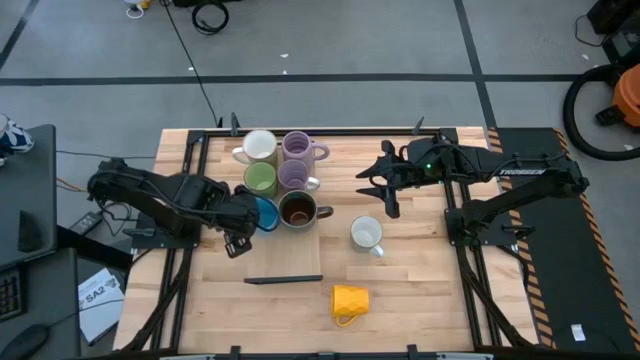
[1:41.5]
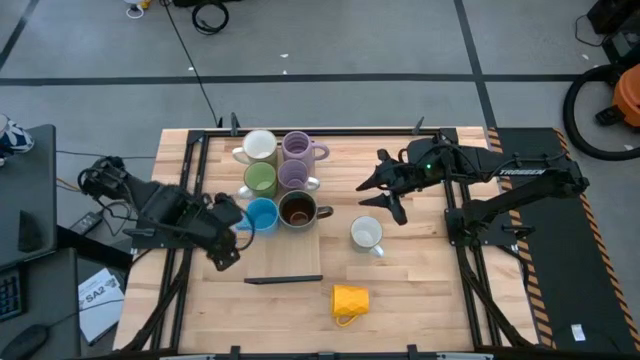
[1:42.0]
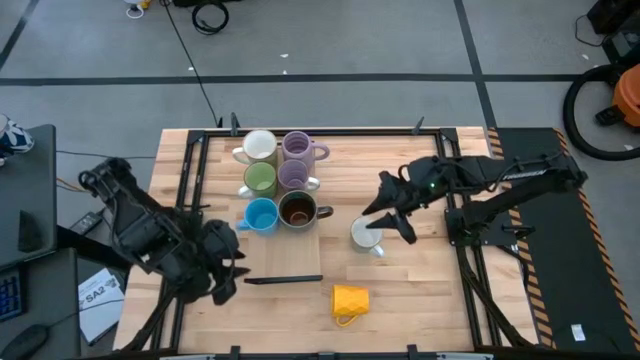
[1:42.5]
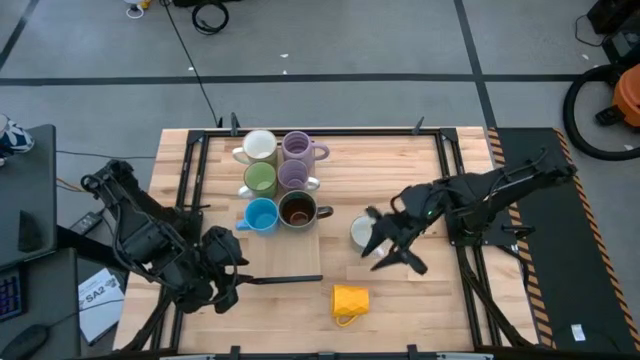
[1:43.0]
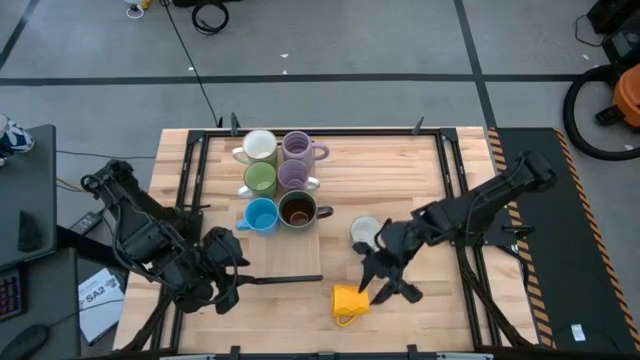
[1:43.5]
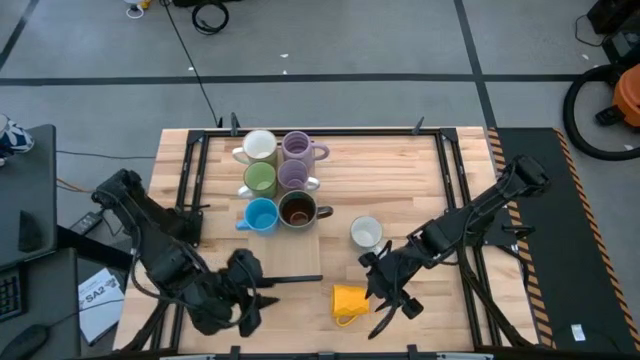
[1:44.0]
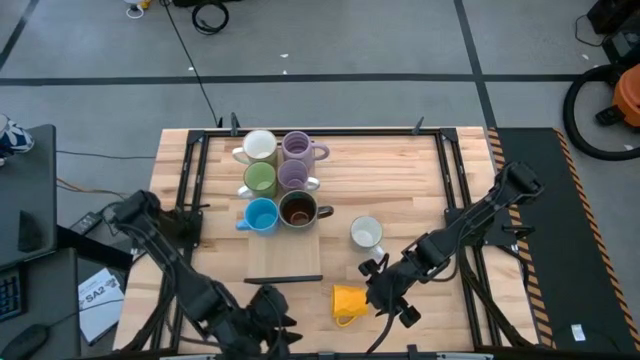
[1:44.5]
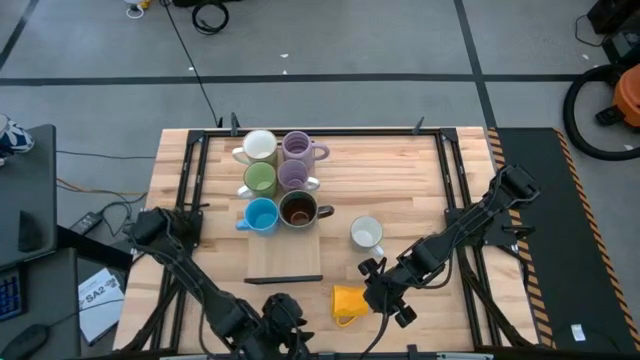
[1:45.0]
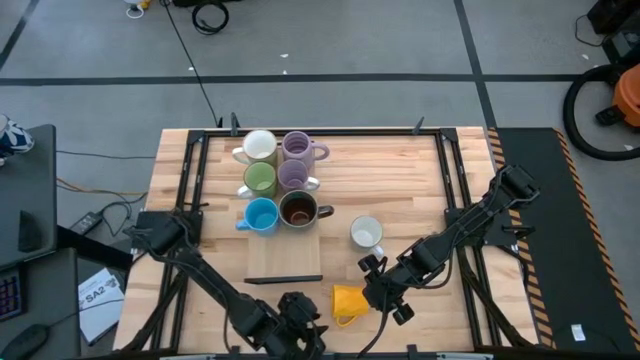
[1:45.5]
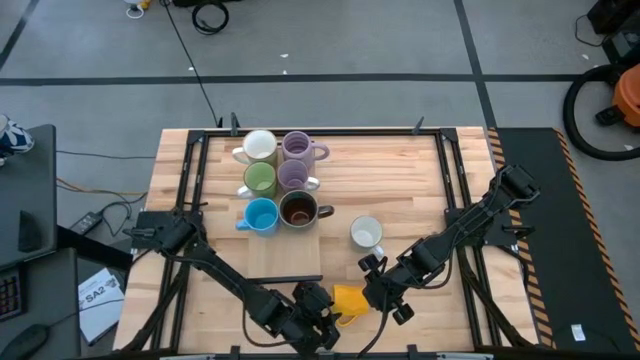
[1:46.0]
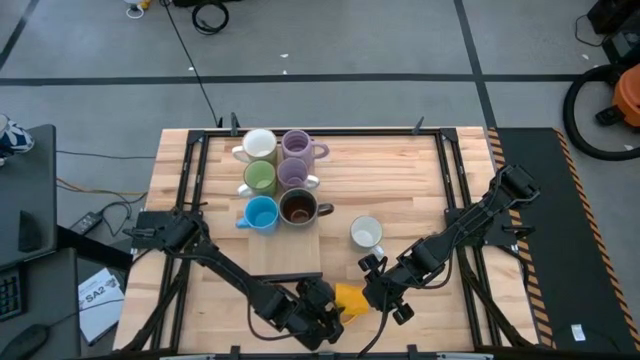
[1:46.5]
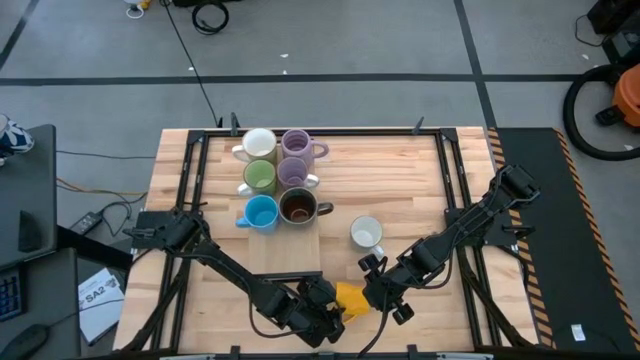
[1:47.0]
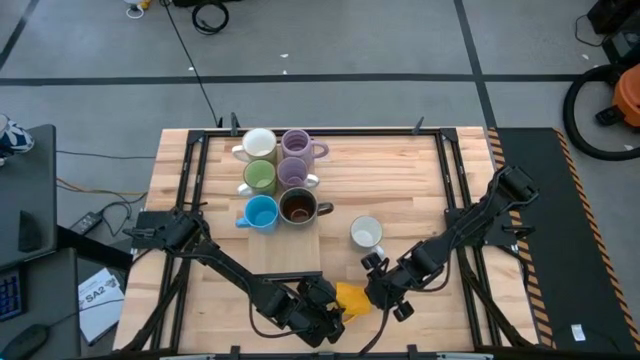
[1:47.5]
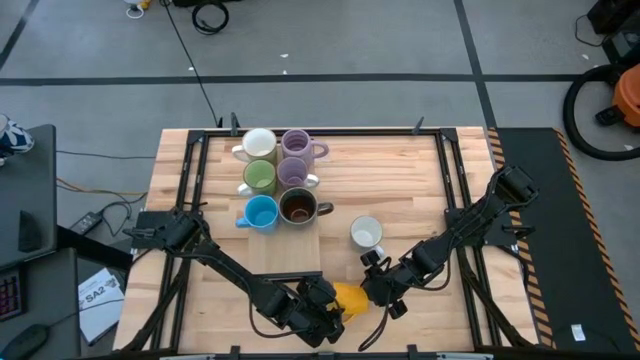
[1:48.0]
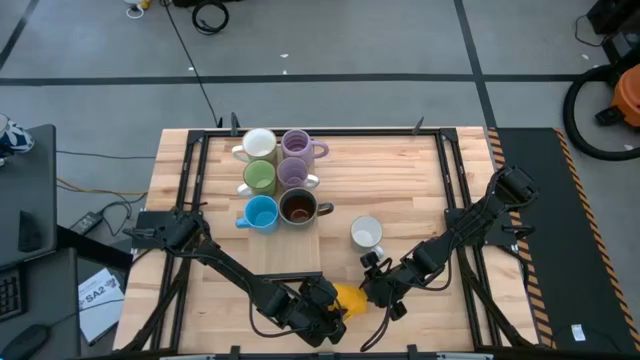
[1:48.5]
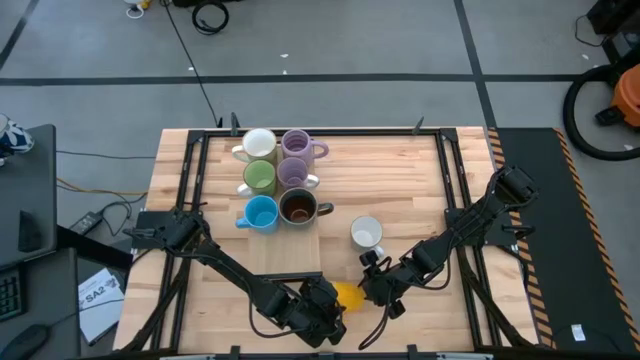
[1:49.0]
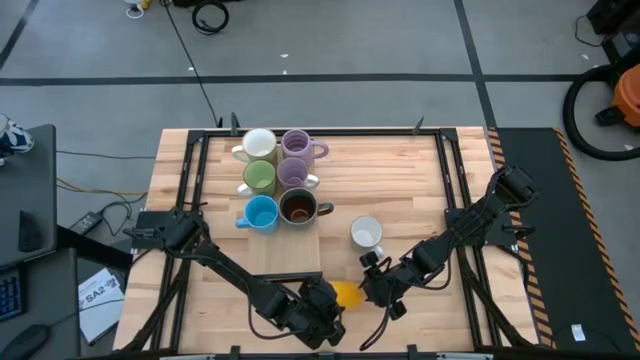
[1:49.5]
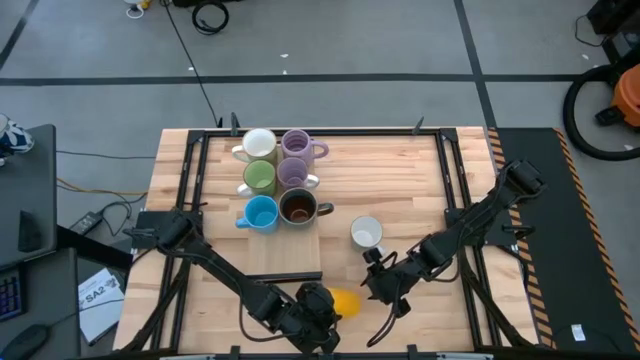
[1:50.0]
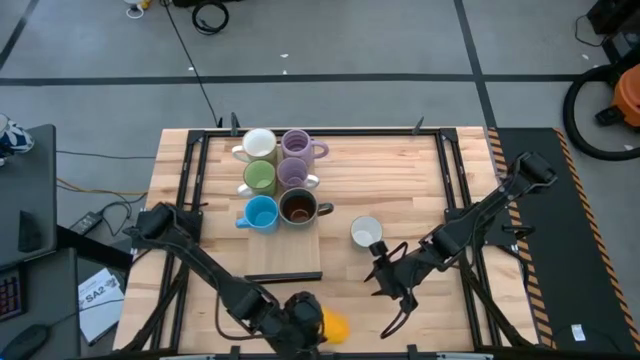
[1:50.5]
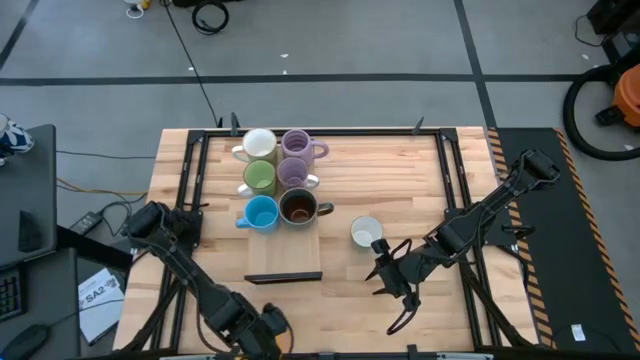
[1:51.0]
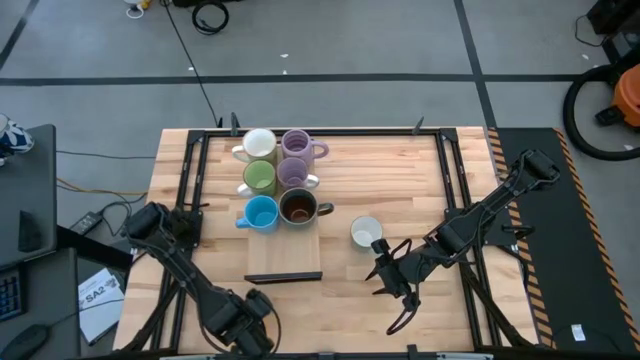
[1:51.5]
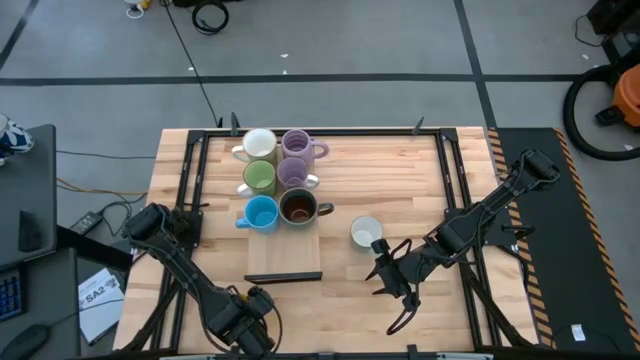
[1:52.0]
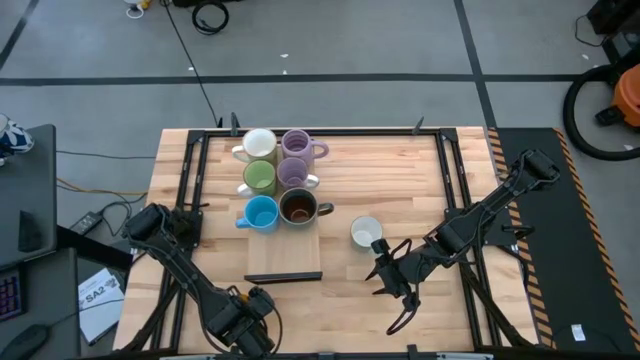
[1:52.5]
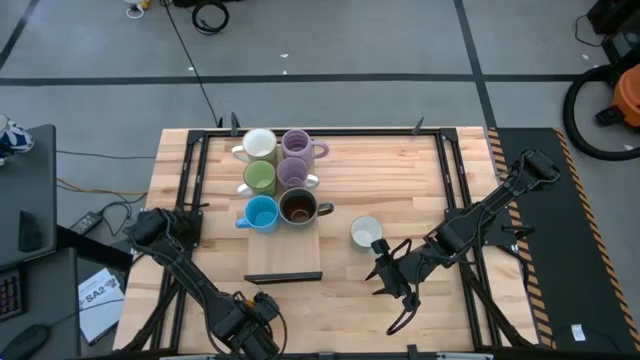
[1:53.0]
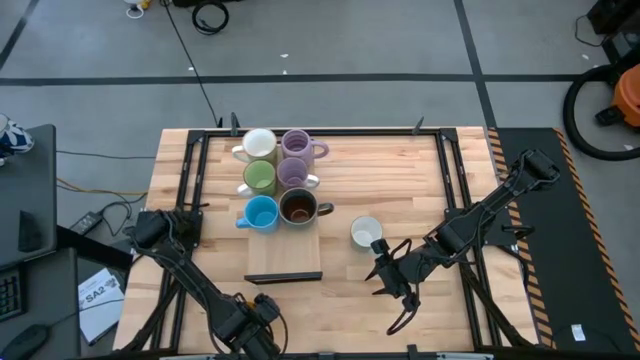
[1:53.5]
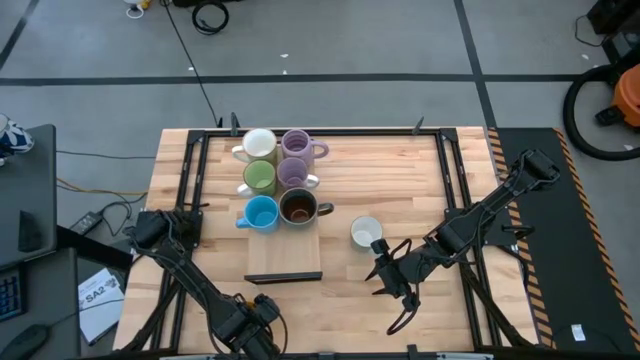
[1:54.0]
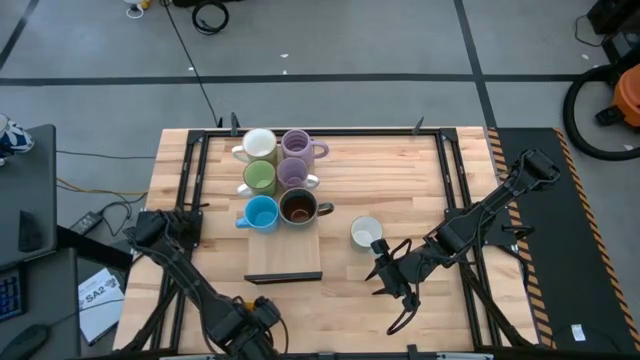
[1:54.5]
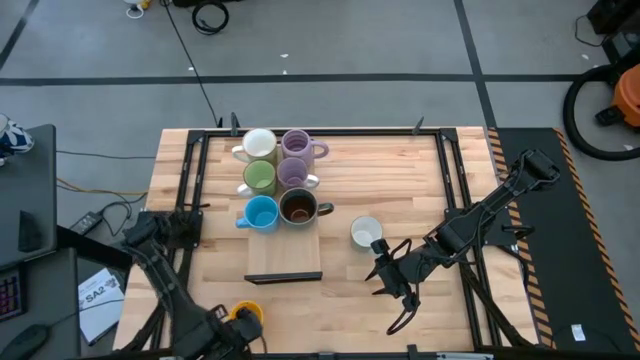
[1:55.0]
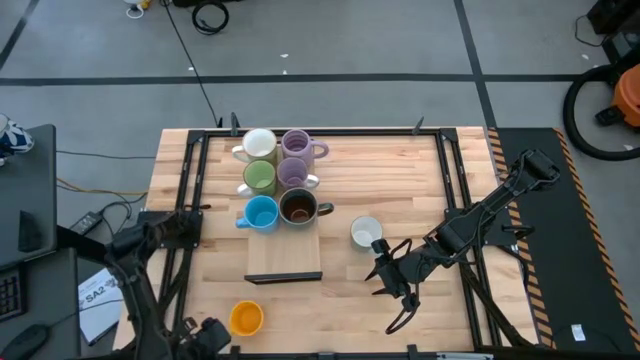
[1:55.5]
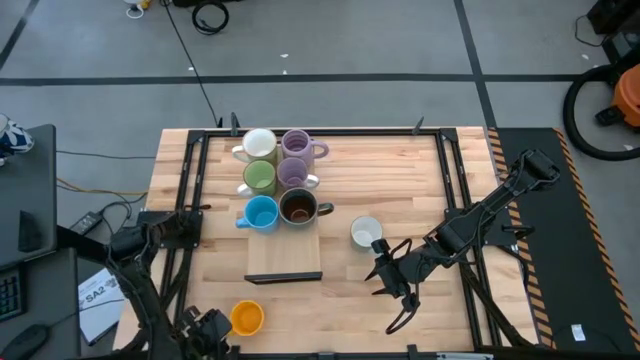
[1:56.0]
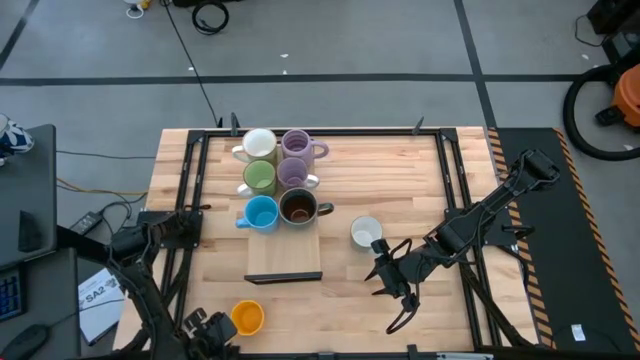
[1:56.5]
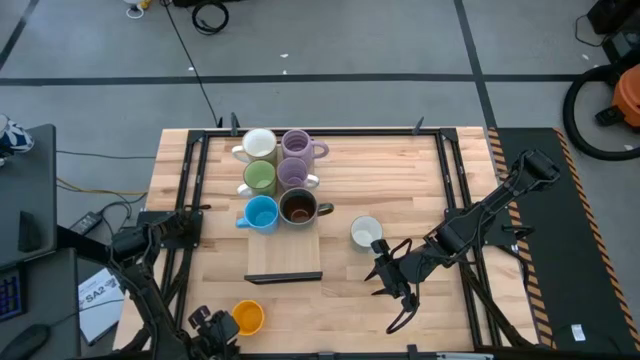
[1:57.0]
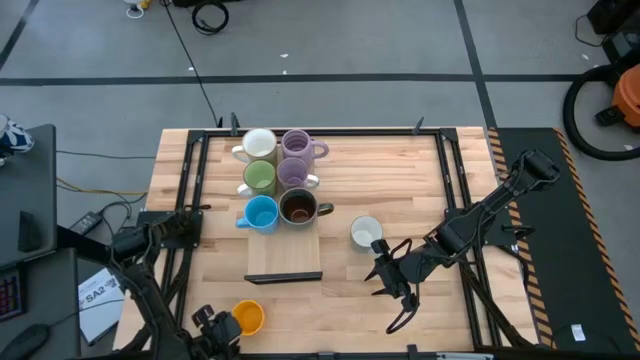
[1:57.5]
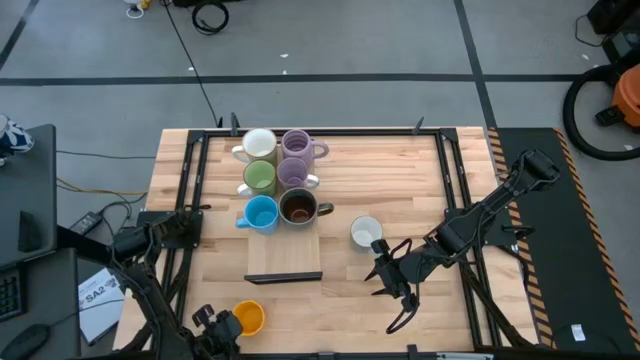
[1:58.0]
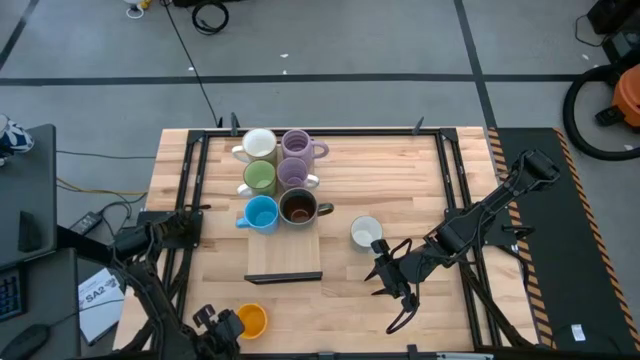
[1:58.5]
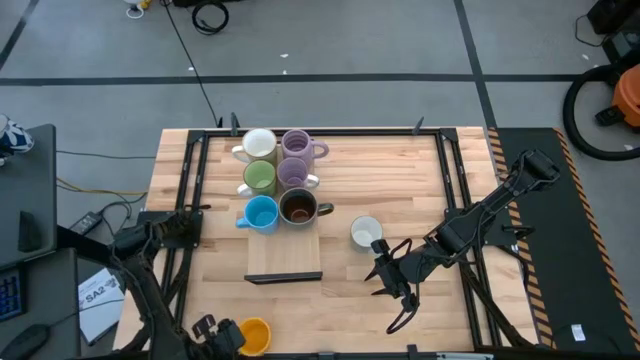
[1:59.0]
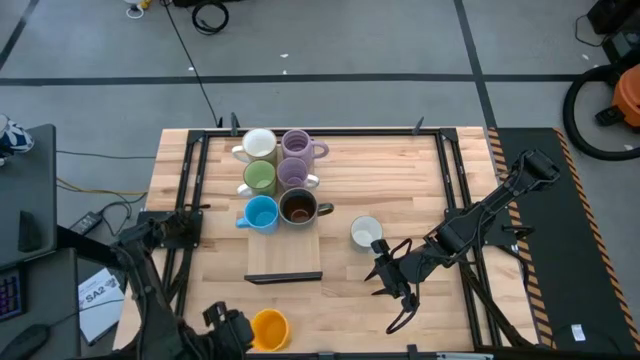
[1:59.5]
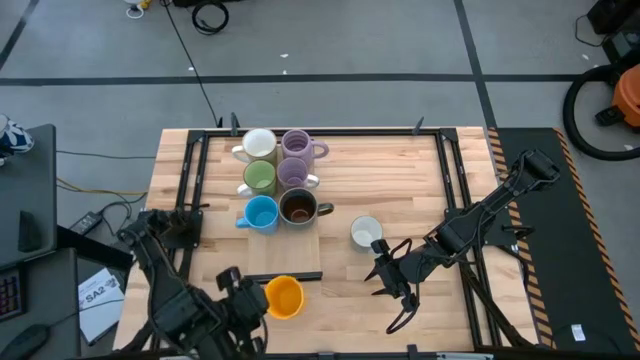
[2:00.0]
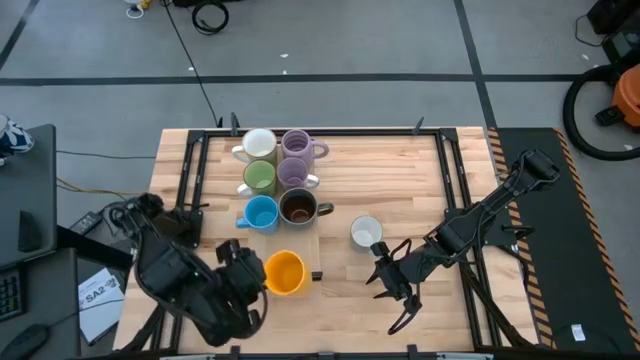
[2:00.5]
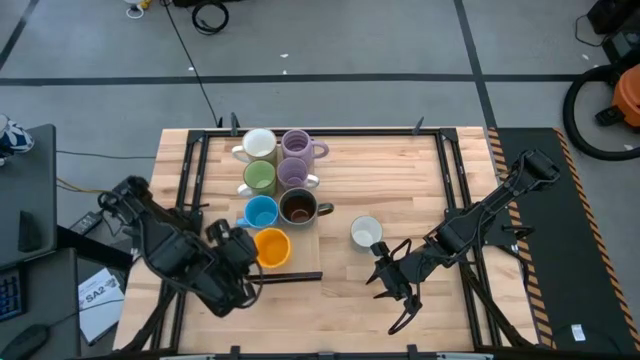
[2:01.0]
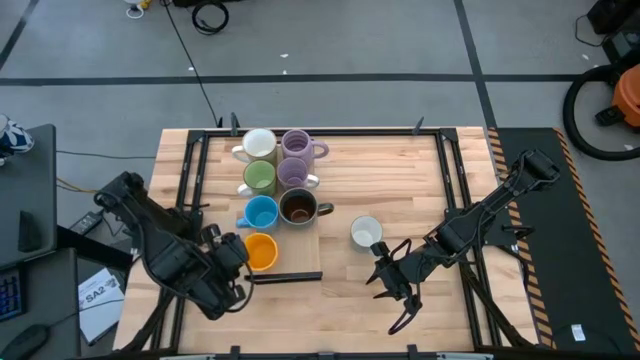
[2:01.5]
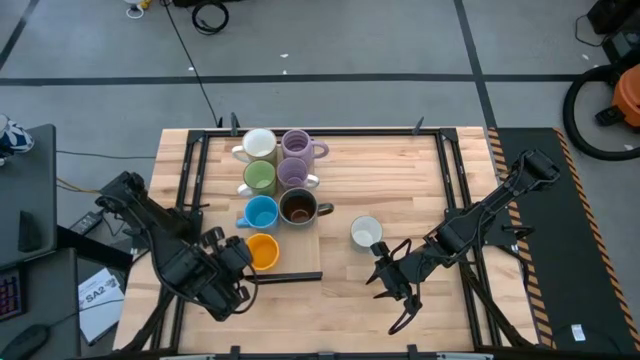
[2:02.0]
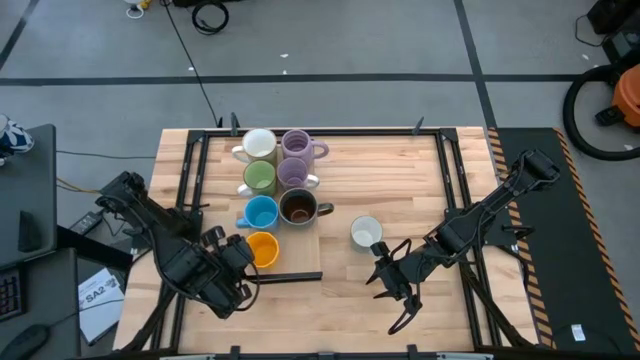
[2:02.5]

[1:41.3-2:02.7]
Task: Place coffee mugs
Put the yellow mug on the shelf
